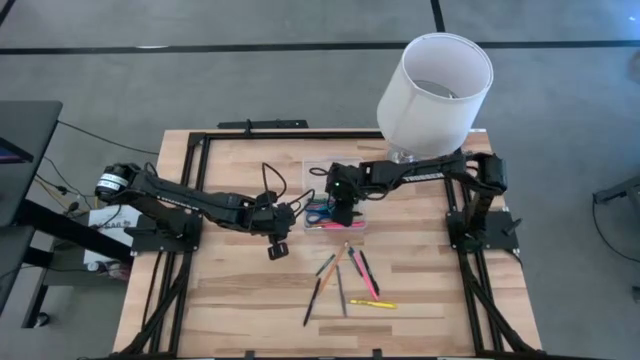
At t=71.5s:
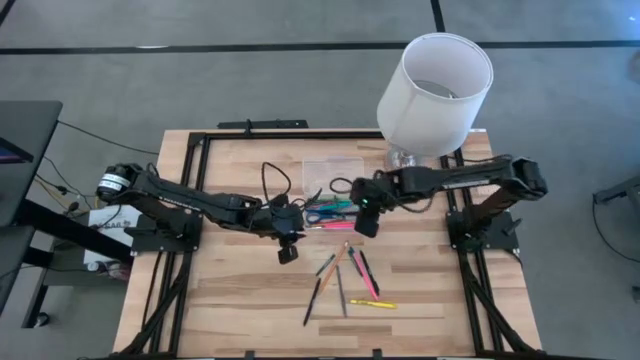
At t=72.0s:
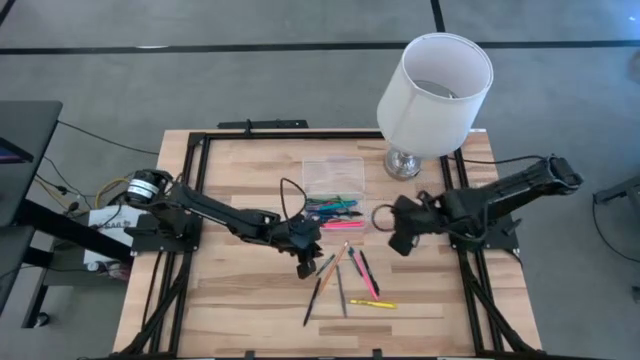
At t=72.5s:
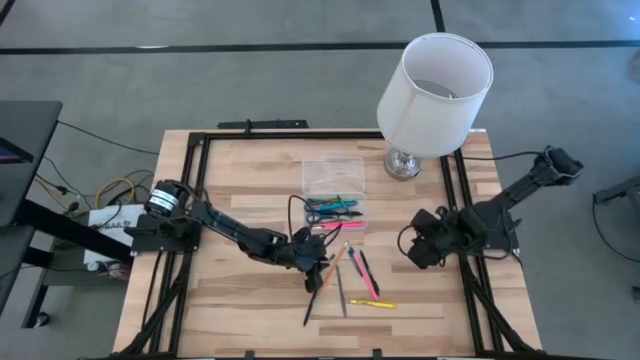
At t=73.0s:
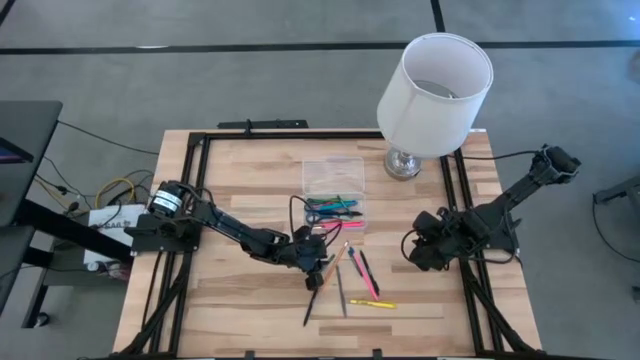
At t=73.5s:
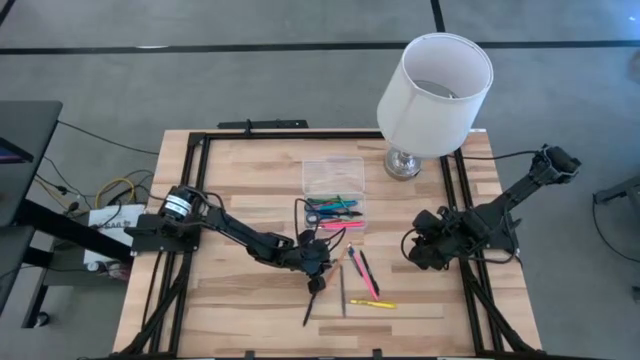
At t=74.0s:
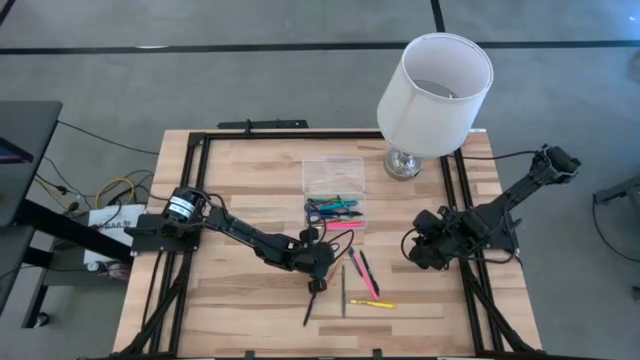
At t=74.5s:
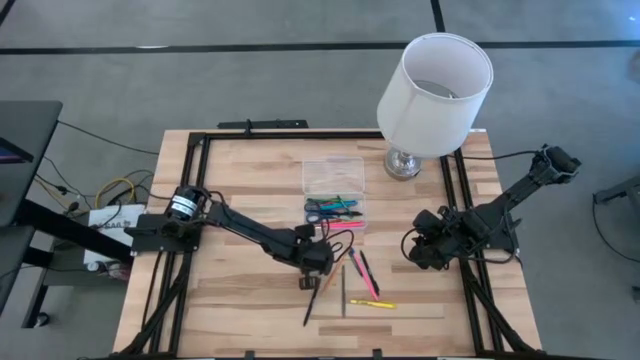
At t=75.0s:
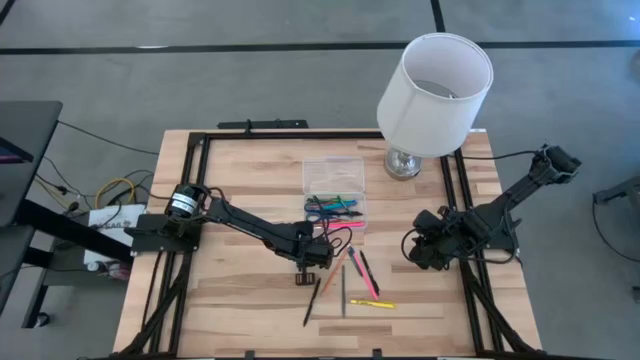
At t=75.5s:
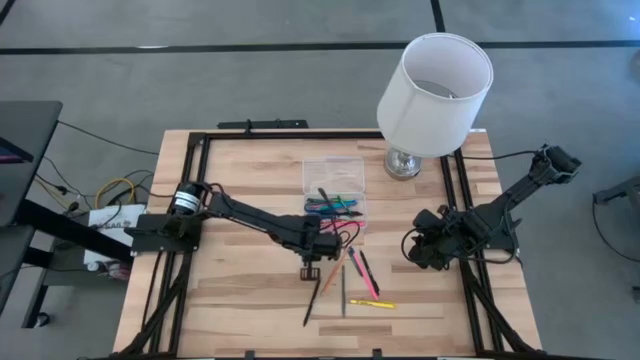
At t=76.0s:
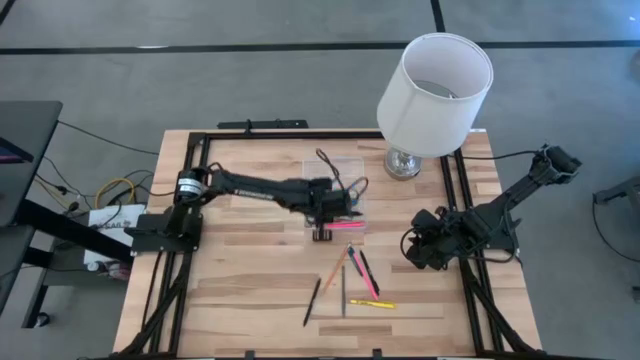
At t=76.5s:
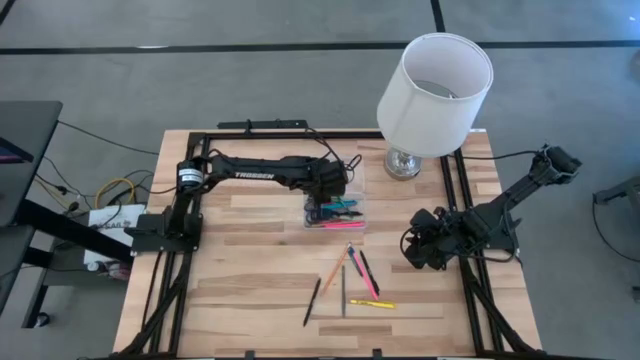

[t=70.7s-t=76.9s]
Task: Pick & place school supplies into a supply box
Put the green crayon into the transparent supply box

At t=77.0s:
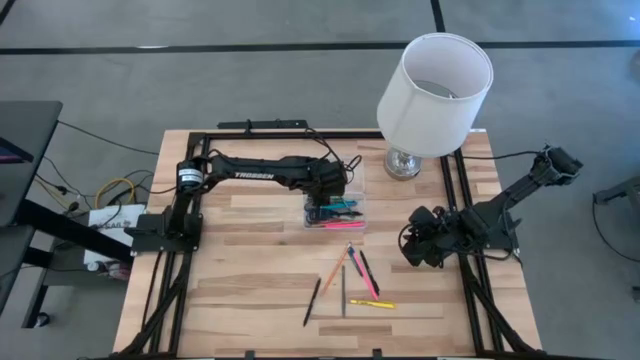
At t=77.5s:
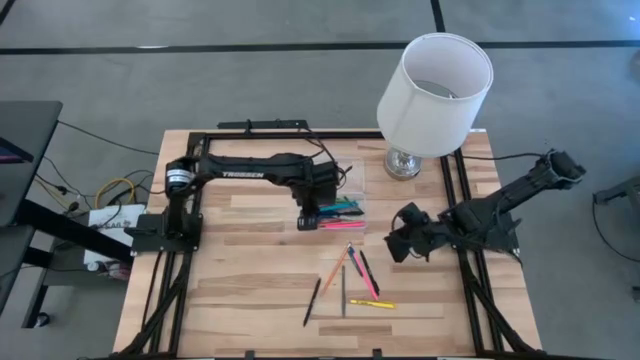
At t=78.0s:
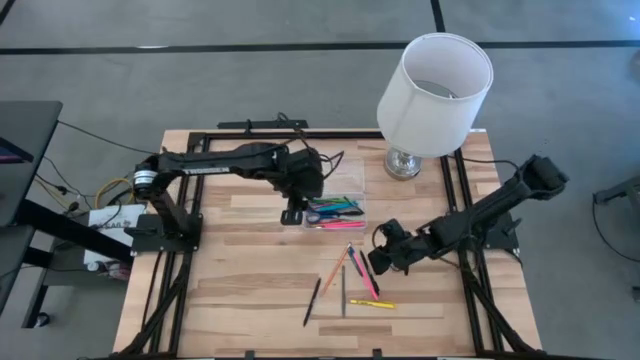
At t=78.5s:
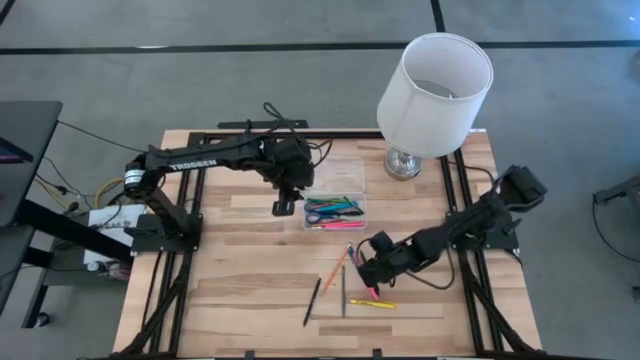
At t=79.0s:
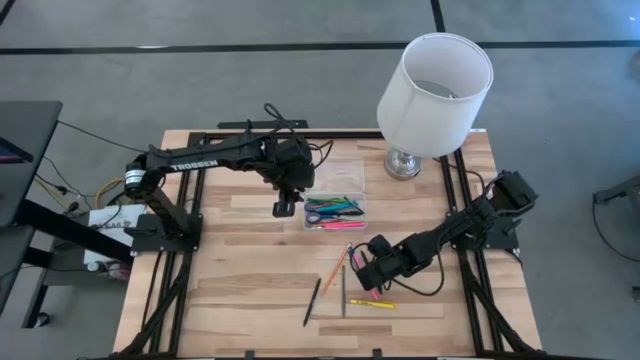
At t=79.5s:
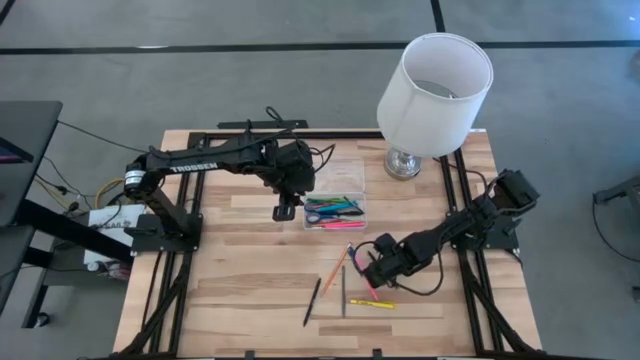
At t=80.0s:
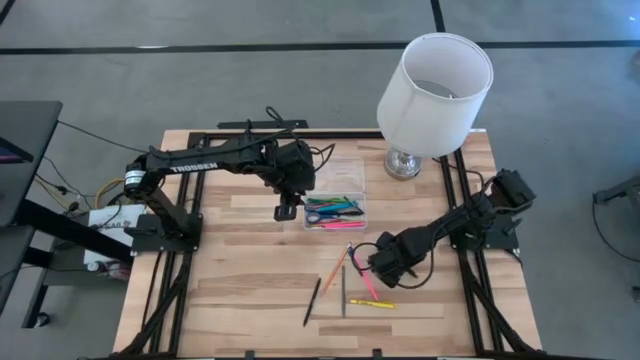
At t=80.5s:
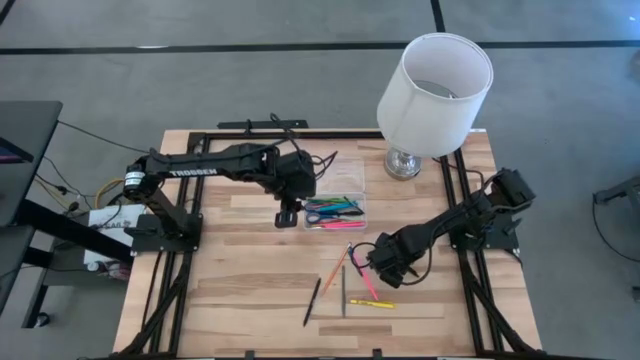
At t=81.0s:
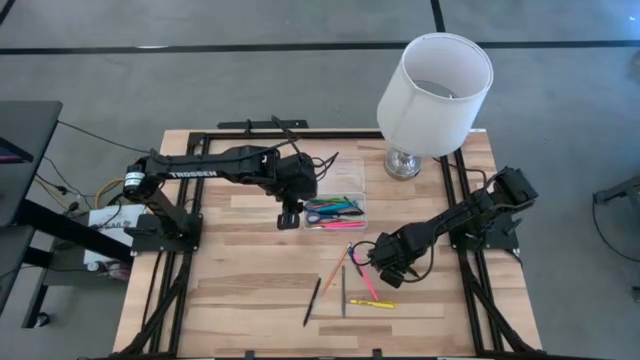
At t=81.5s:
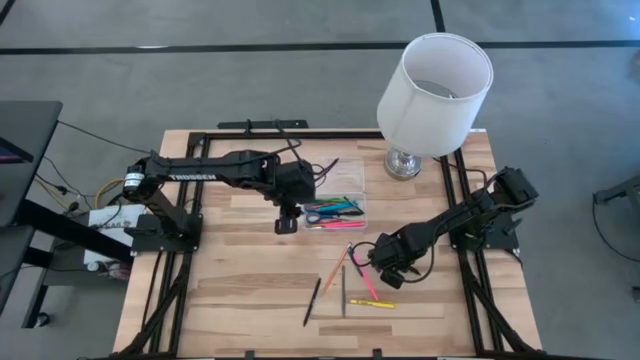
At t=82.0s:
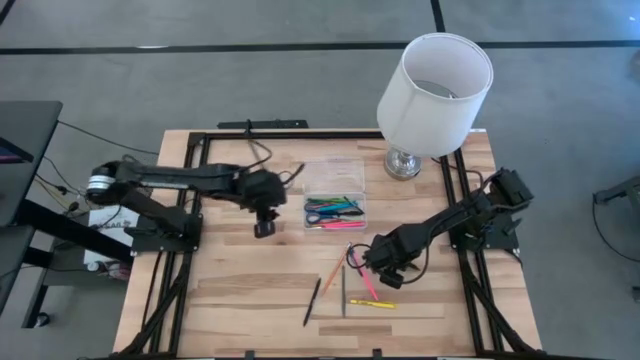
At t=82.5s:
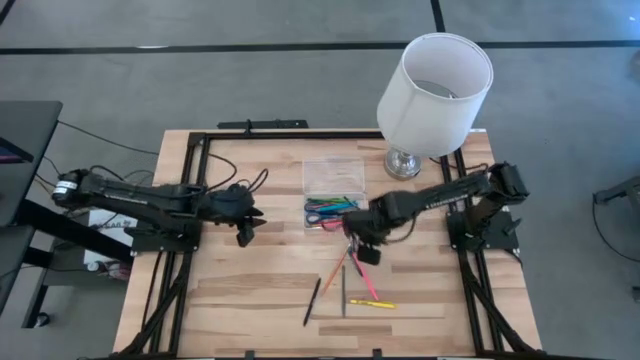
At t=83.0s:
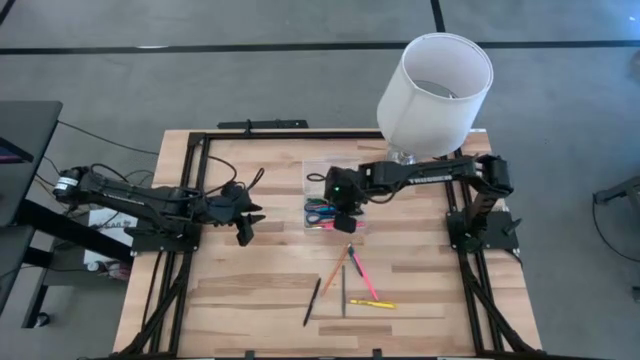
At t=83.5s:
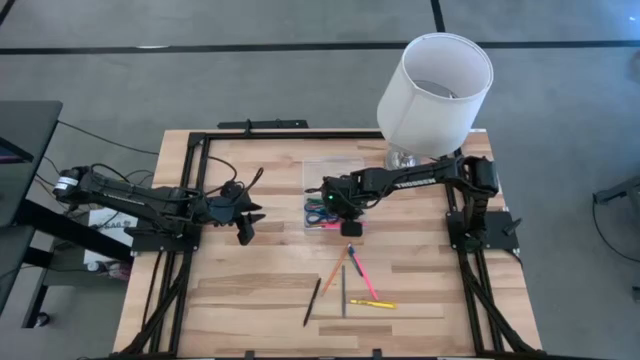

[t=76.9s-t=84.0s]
Put the black ballpen into the transparent supply box

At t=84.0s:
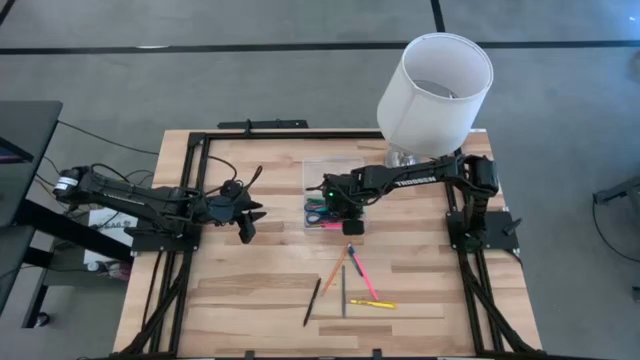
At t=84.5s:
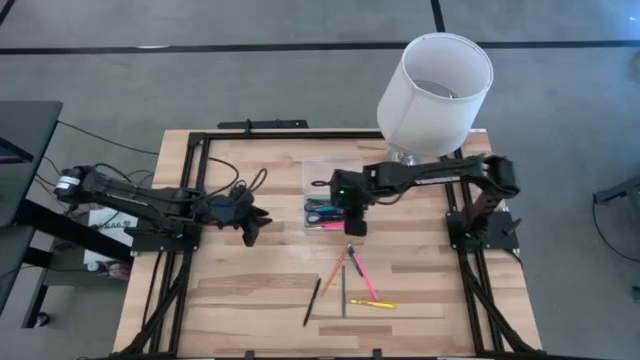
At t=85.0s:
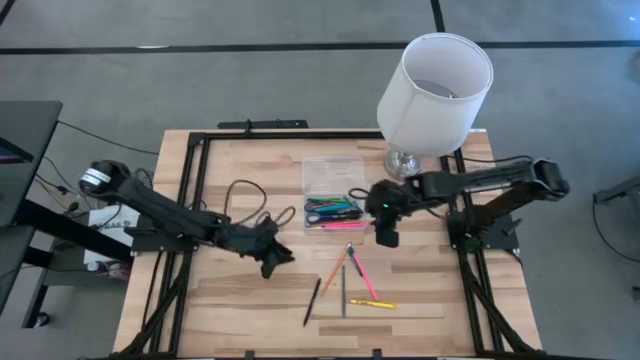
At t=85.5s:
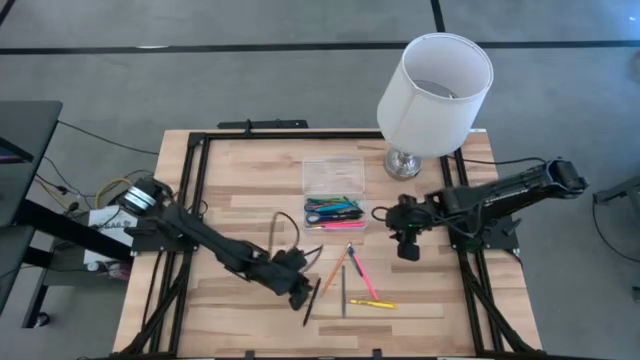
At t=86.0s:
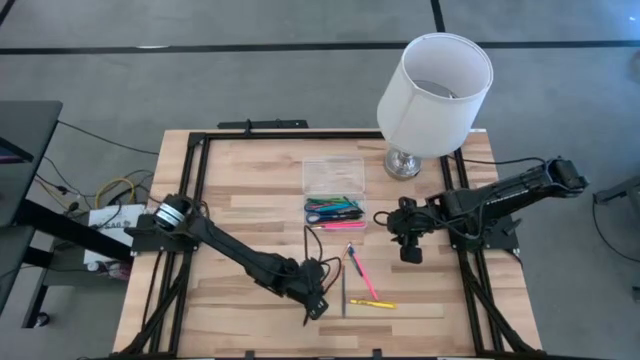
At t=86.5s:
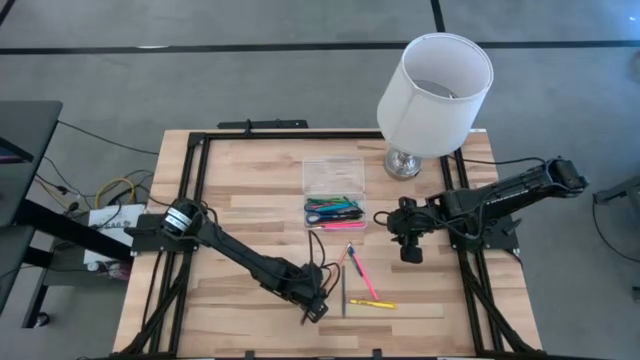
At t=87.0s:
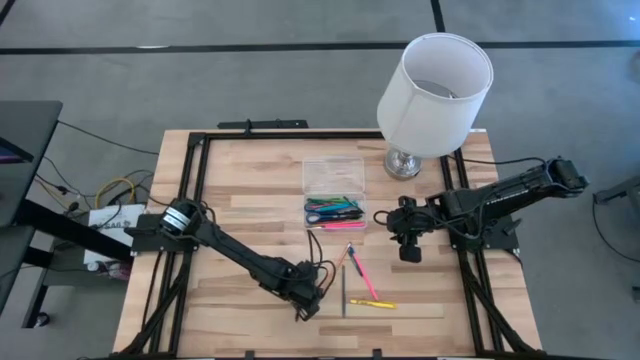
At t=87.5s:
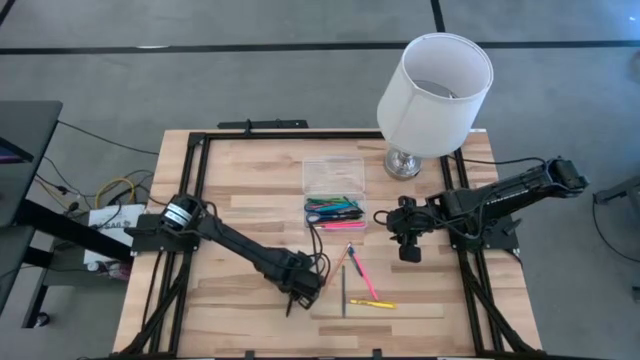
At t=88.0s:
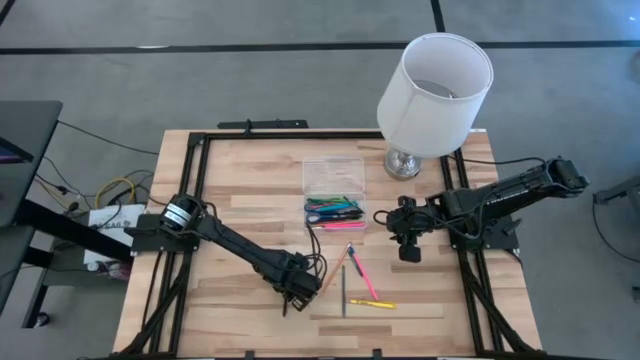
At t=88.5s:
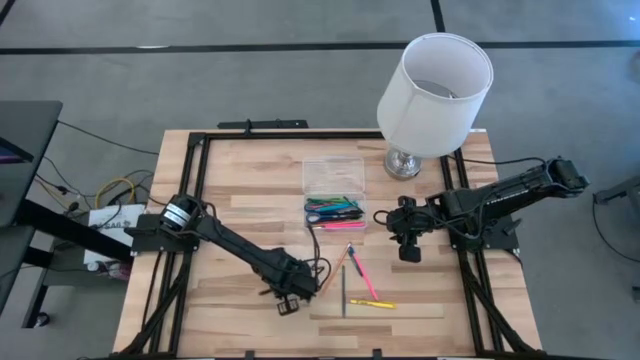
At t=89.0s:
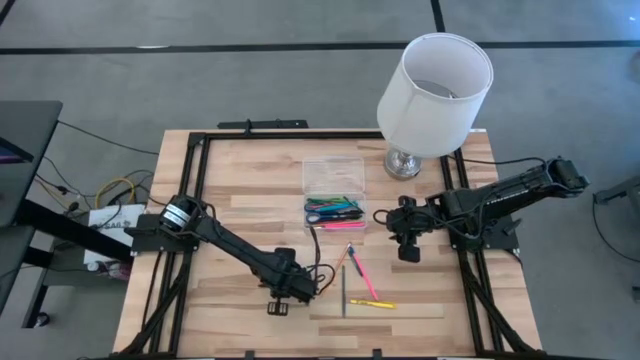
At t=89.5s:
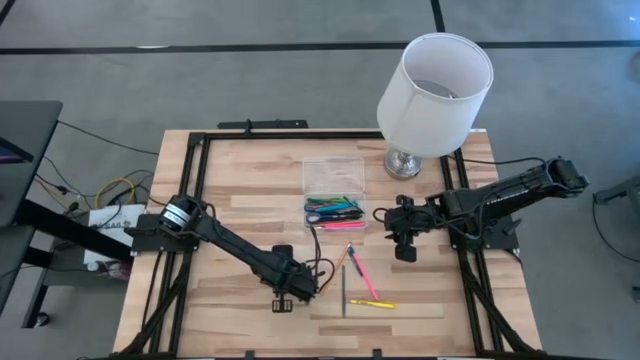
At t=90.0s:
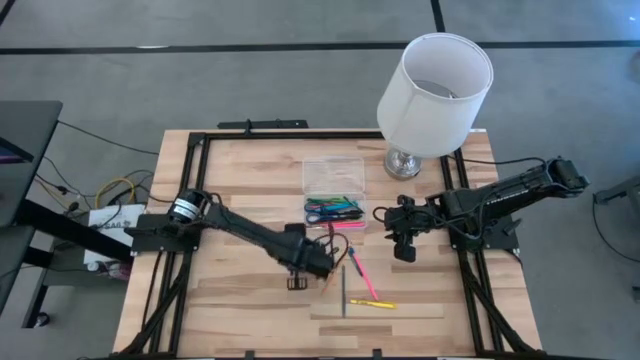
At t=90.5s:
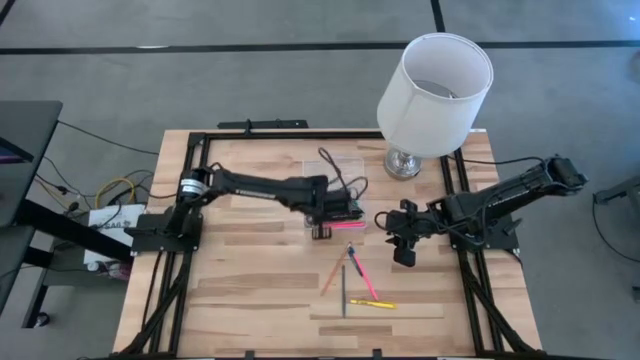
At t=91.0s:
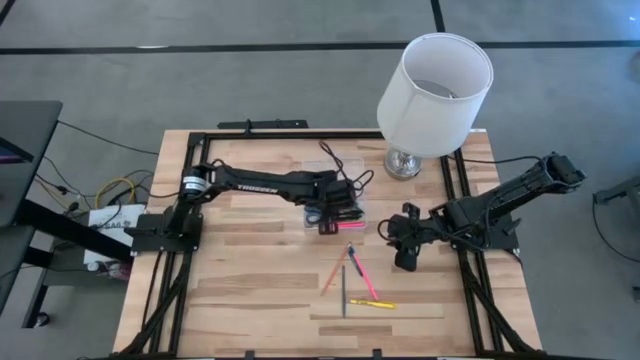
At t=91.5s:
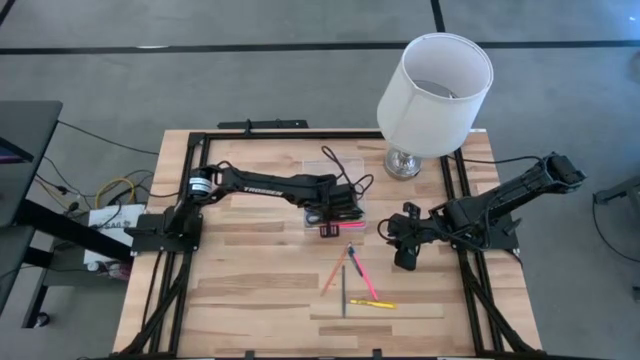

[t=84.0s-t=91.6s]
Put the black ballpen into the transparent supply box
